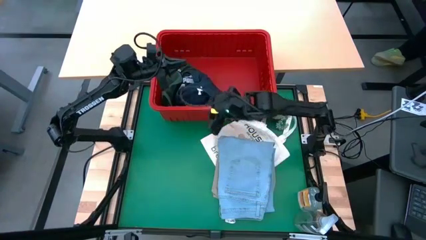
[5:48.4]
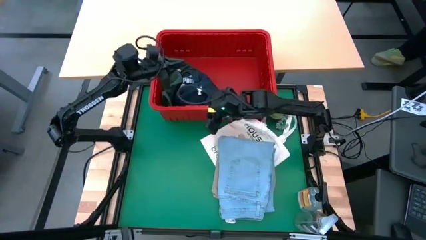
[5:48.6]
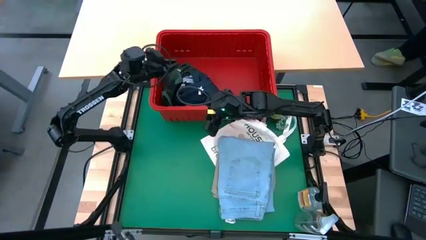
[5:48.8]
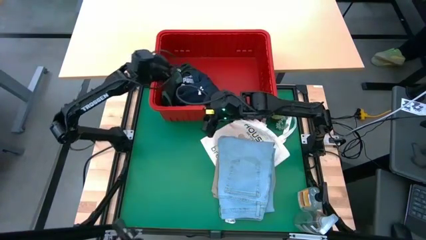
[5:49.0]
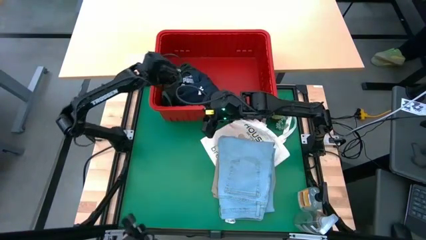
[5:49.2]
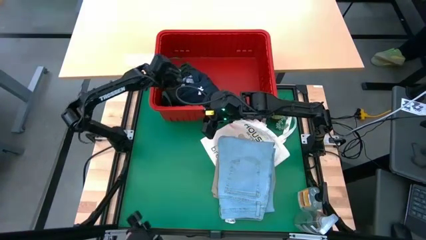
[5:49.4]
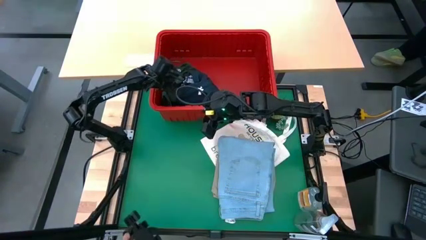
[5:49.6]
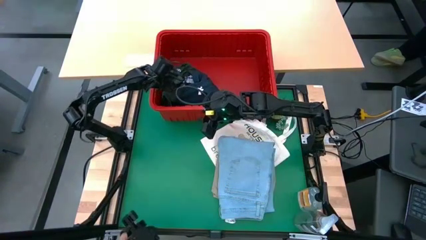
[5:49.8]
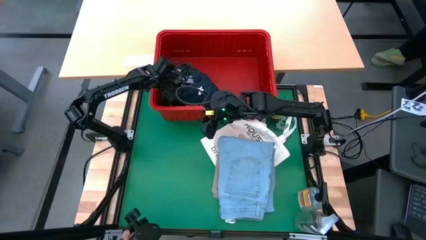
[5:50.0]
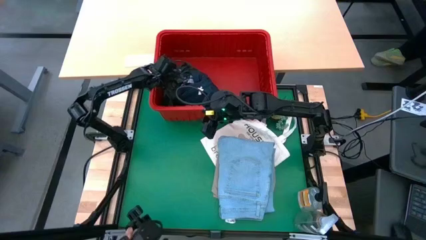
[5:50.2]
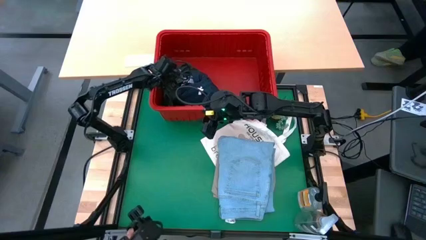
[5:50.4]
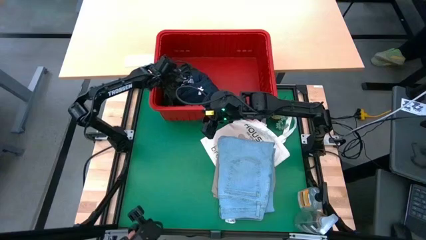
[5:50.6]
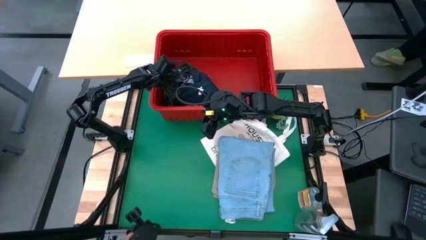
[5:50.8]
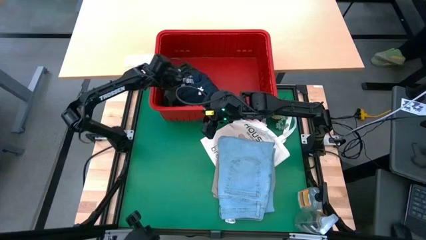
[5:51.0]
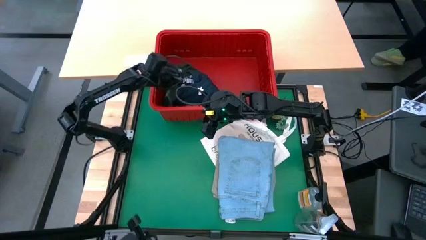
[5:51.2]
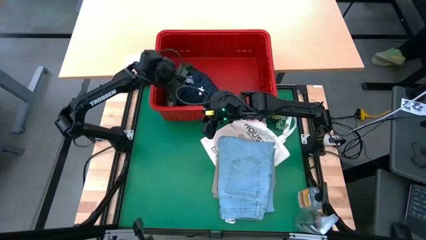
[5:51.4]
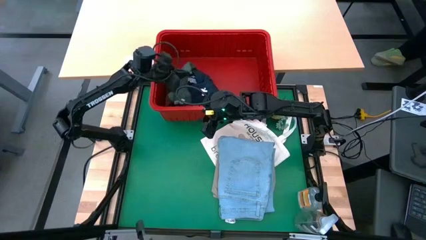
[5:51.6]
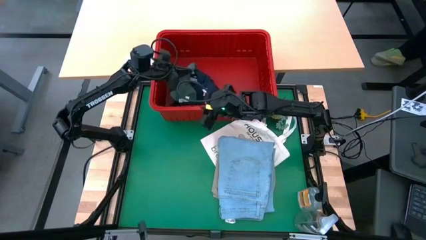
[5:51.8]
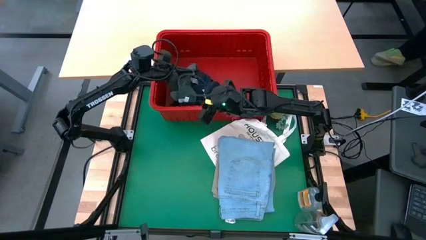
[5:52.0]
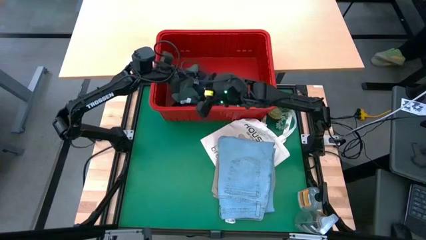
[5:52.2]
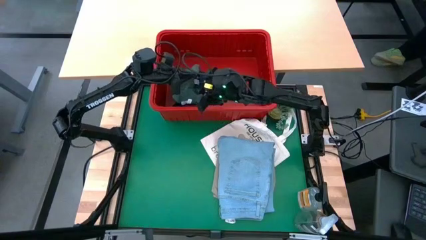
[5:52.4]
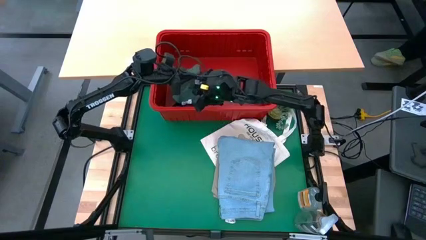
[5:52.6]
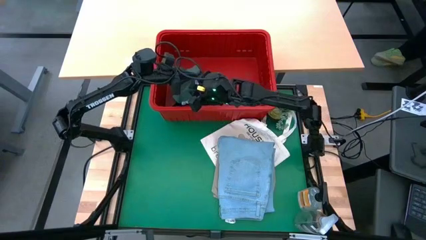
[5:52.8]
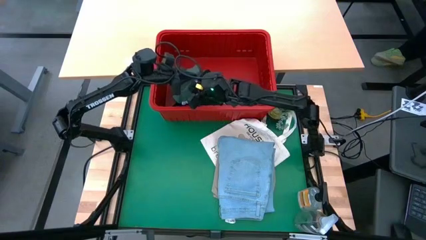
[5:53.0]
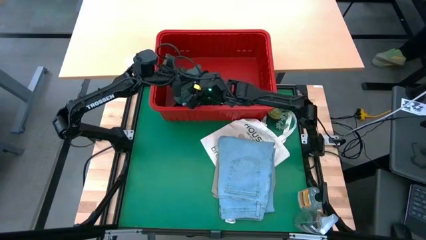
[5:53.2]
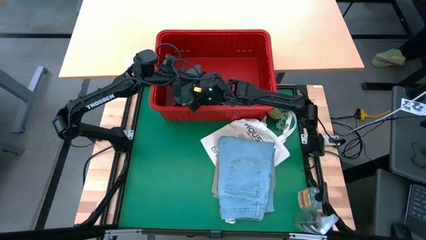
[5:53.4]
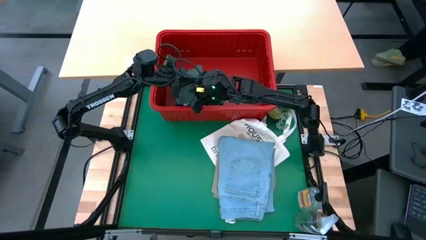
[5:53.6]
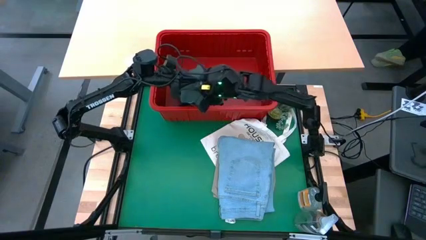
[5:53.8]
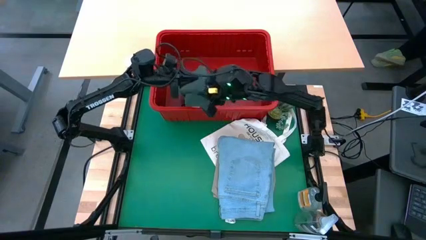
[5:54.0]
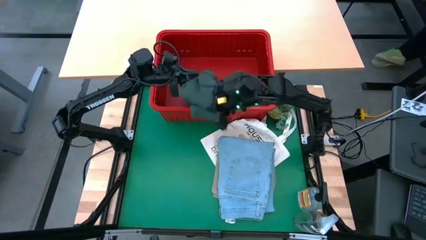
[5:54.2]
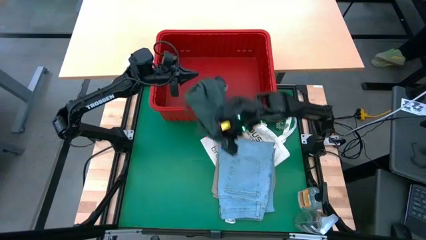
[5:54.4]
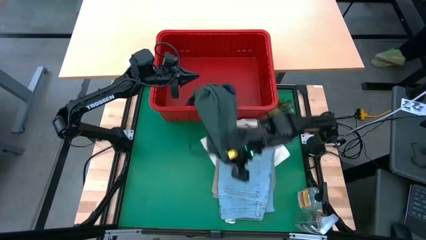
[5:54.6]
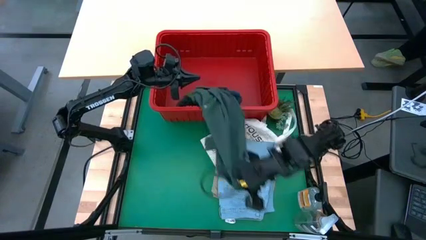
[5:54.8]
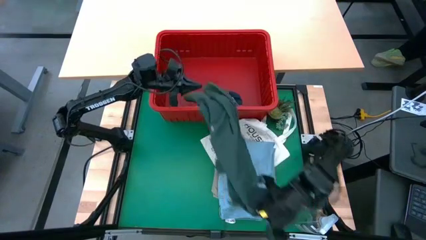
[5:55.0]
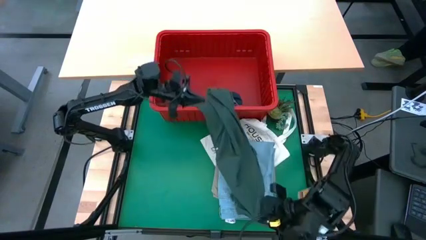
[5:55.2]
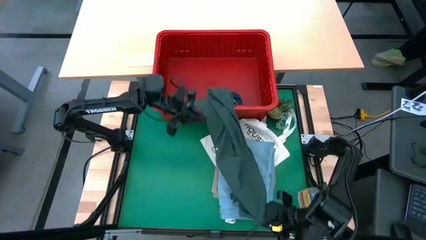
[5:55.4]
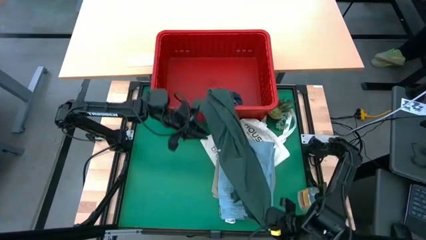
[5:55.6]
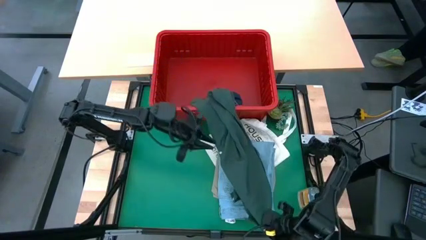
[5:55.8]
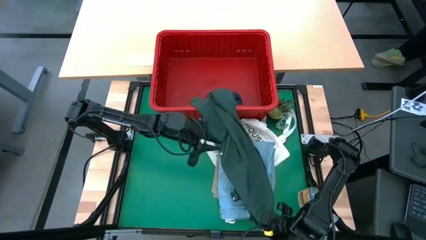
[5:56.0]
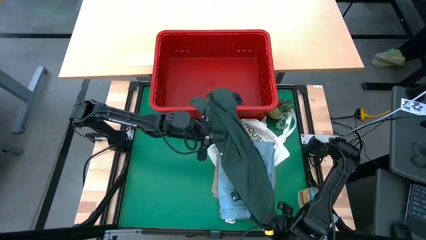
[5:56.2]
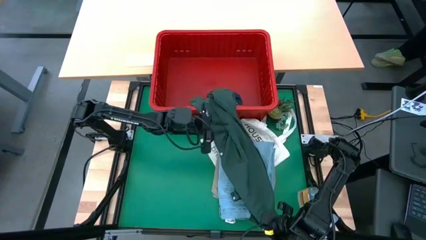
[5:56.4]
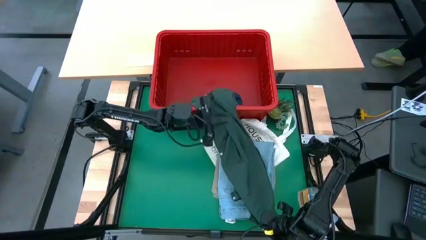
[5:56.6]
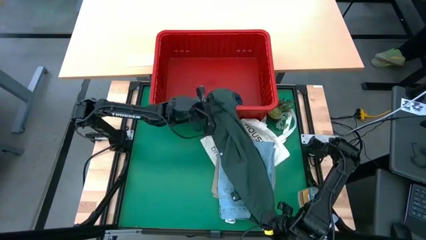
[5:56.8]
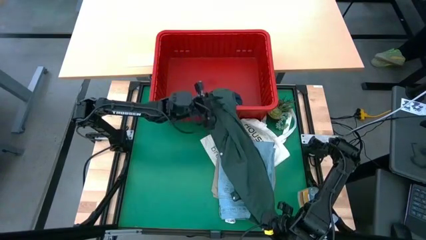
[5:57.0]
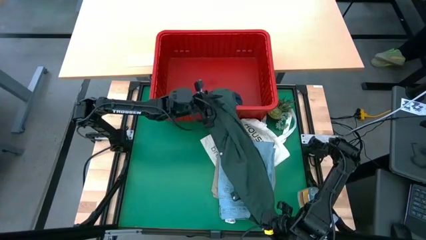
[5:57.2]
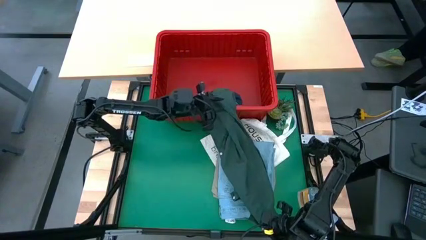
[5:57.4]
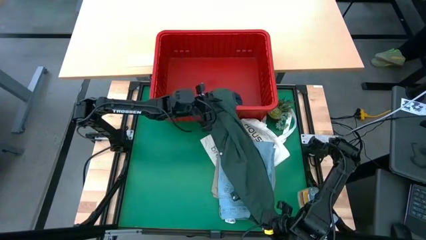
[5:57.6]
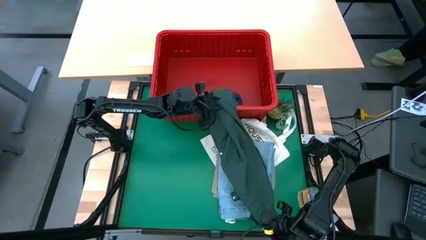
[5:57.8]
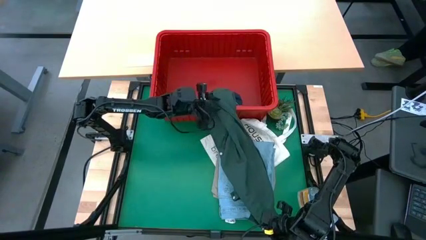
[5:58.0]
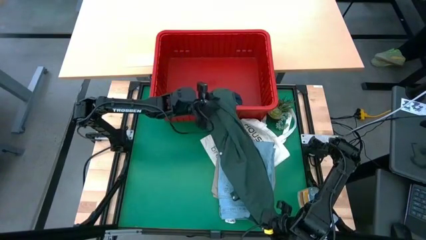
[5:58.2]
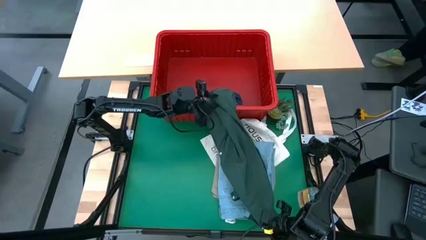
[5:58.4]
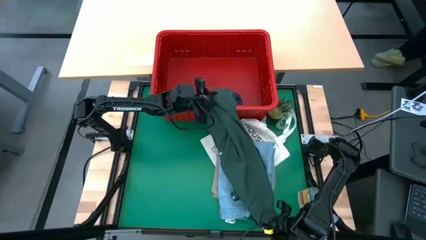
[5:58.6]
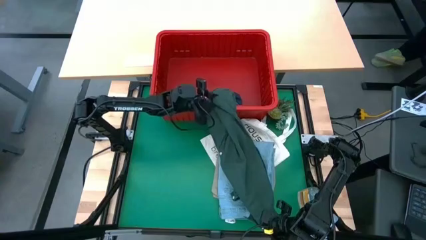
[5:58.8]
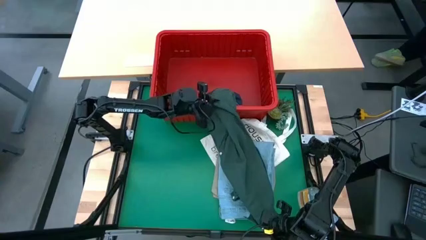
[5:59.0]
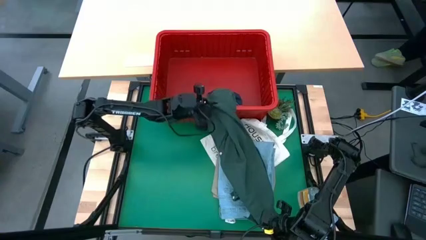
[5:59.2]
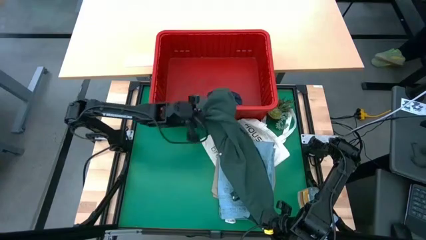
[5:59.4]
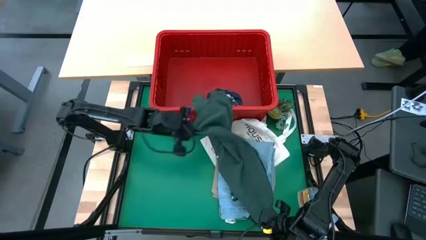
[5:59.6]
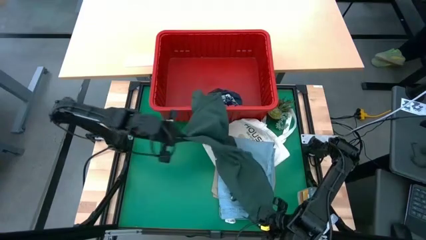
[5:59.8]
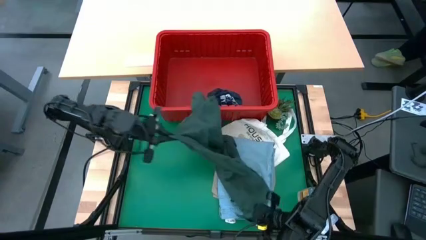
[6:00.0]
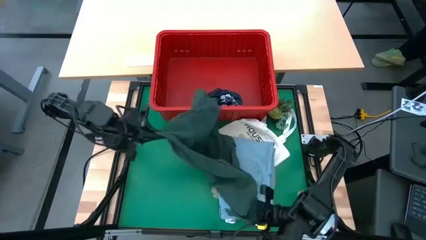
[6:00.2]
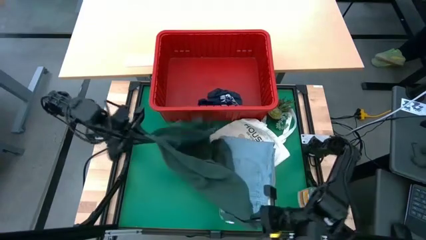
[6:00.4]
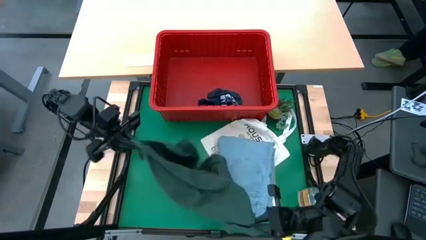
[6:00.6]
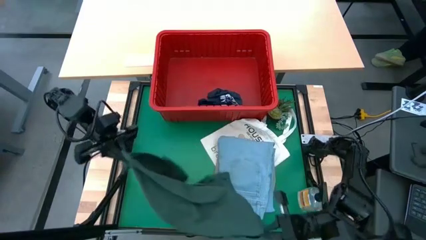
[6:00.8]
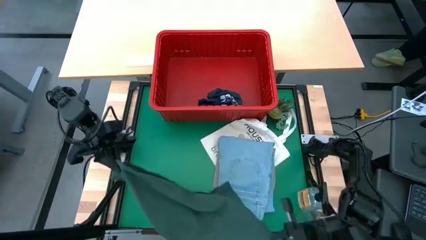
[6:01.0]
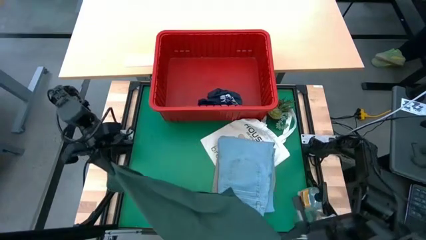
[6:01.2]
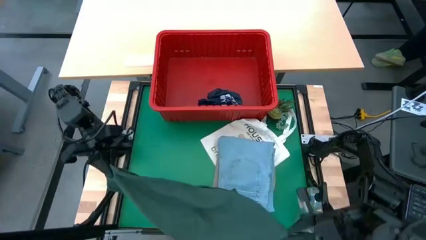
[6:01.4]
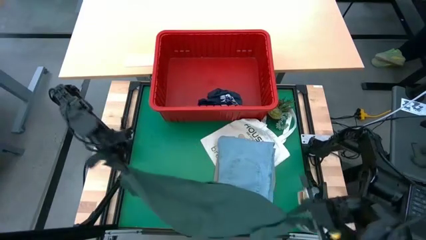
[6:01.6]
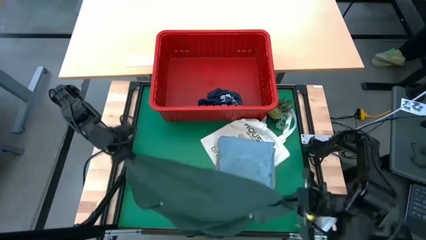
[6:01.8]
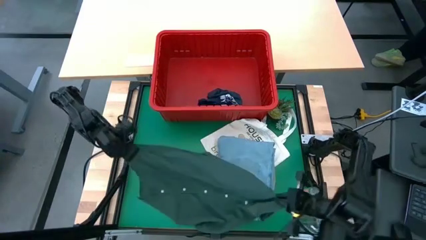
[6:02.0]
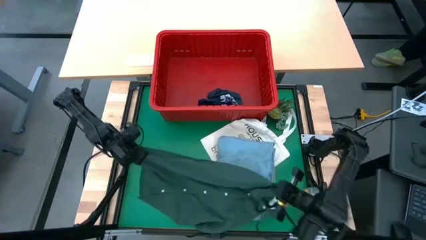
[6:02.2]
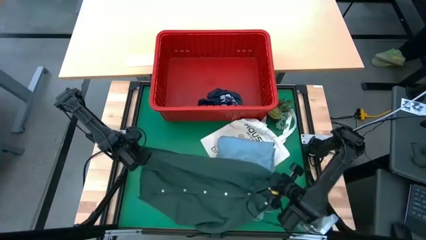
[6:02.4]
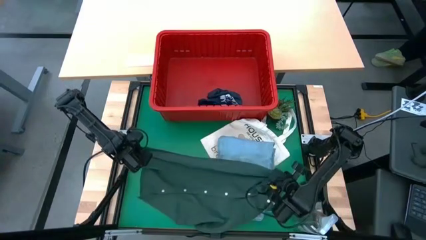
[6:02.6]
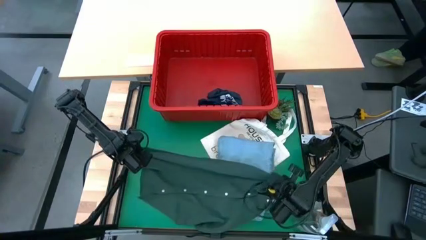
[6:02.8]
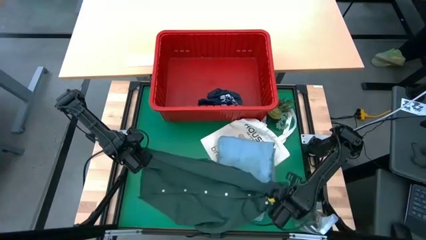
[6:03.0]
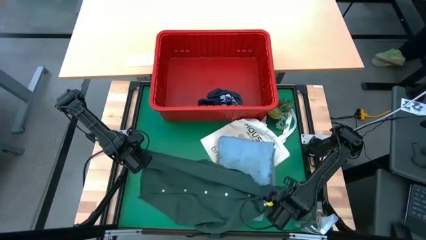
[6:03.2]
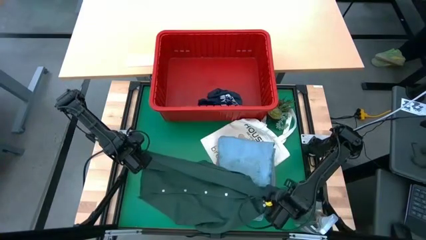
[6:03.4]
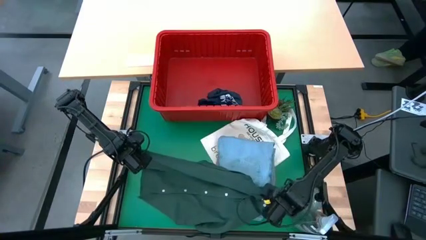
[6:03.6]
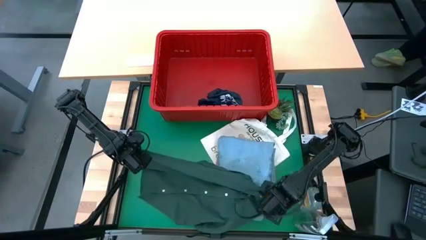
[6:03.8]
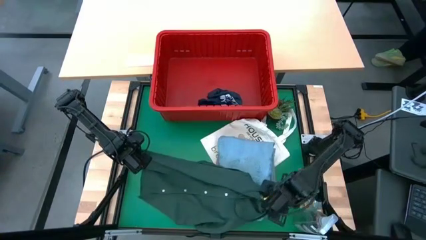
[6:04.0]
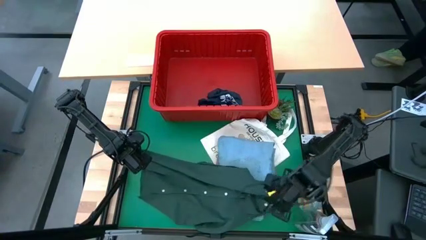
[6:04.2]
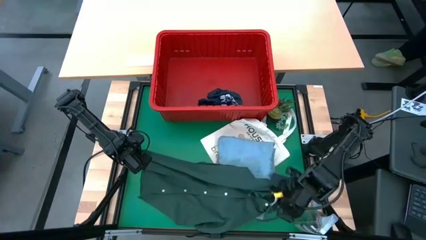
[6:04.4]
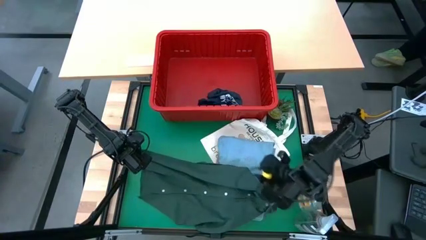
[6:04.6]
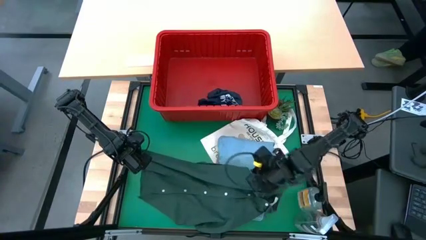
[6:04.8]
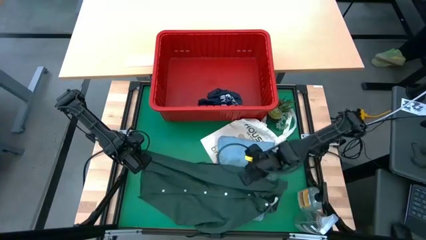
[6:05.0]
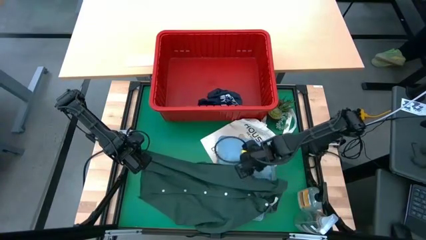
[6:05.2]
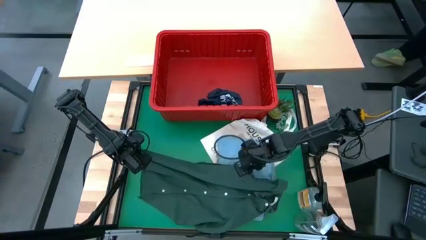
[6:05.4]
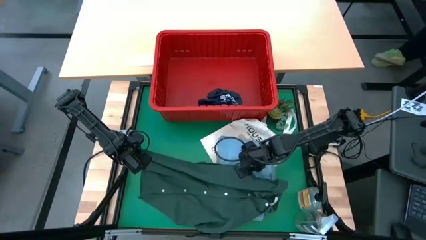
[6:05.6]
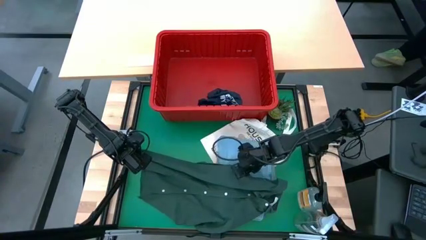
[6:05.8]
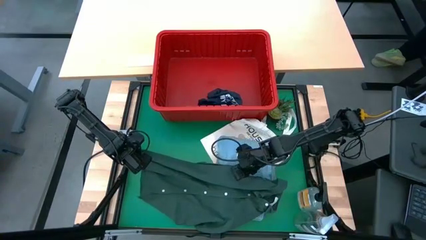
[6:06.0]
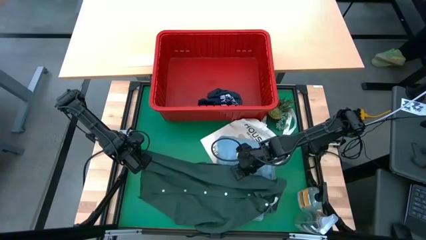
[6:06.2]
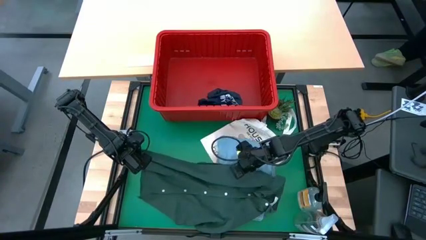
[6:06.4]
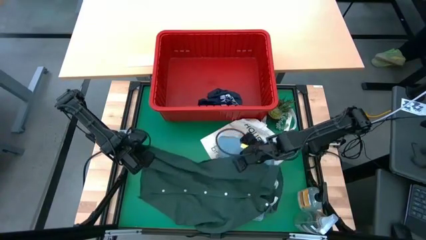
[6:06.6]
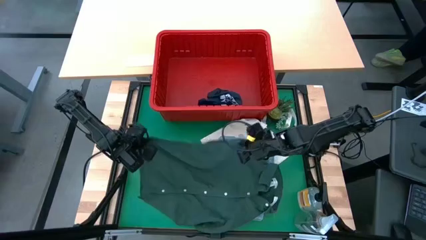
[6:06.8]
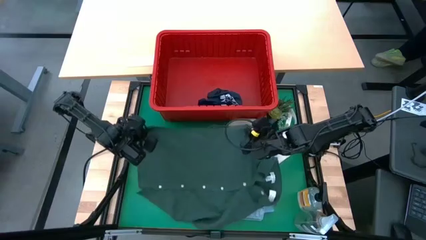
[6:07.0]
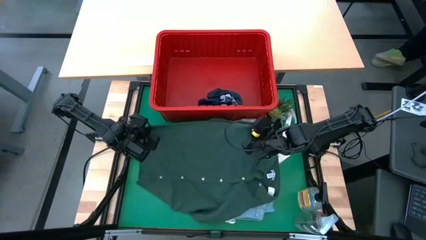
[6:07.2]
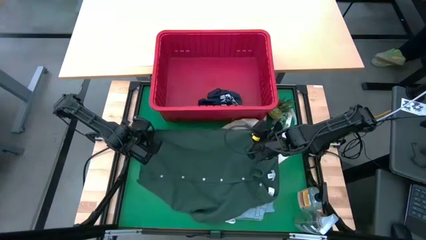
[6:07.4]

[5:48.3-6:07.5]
Task: Fold Laundry from Bin
Fold the green polo shirt
